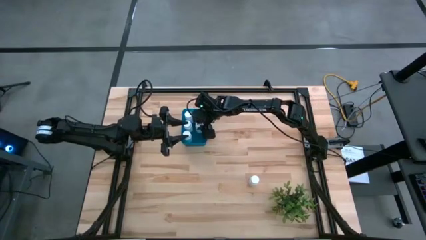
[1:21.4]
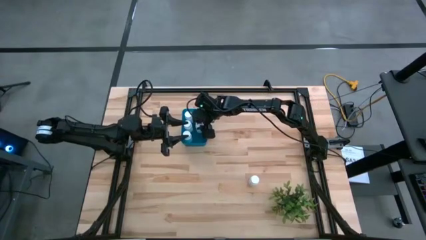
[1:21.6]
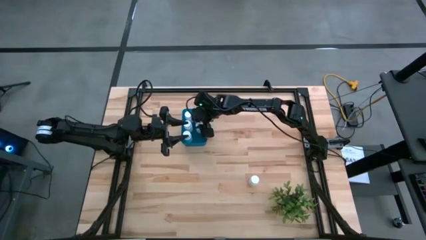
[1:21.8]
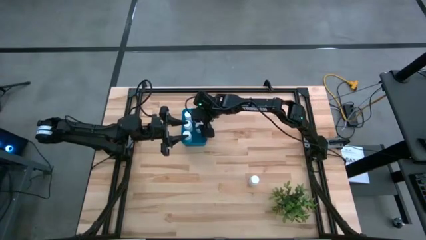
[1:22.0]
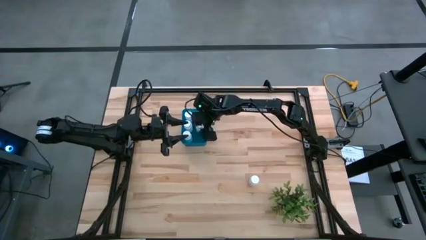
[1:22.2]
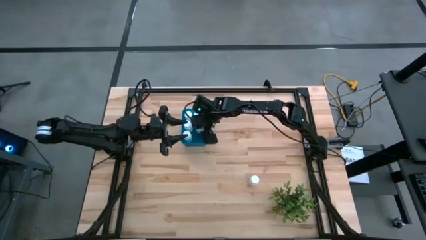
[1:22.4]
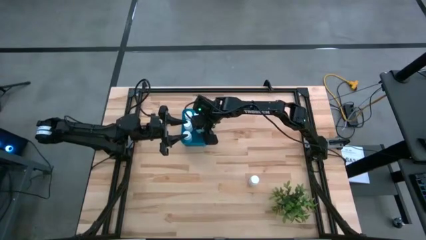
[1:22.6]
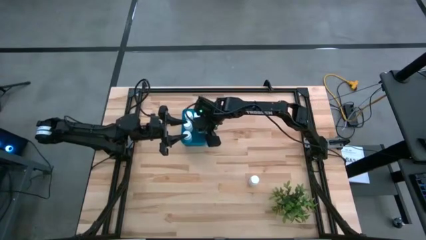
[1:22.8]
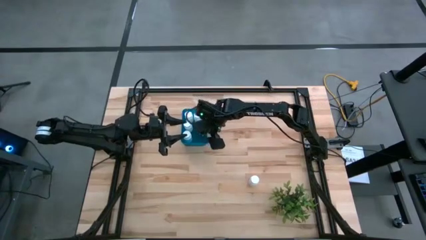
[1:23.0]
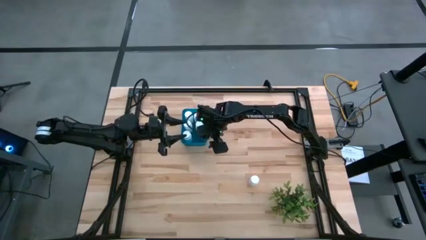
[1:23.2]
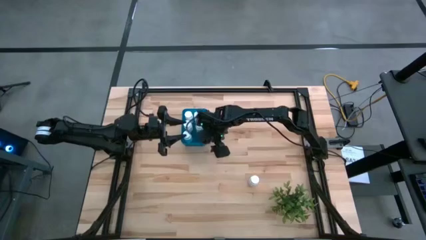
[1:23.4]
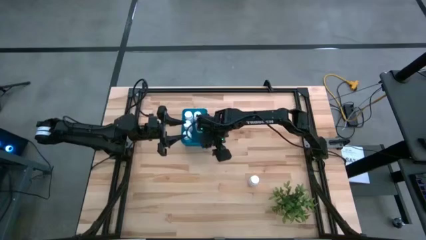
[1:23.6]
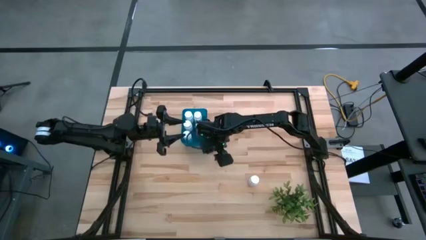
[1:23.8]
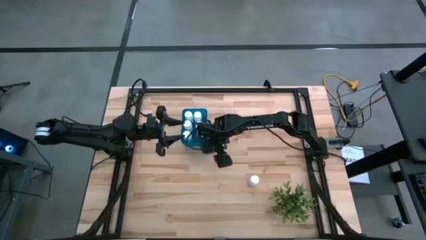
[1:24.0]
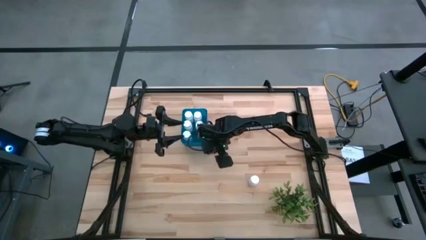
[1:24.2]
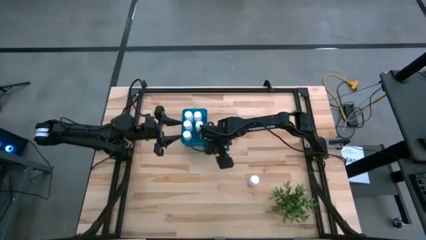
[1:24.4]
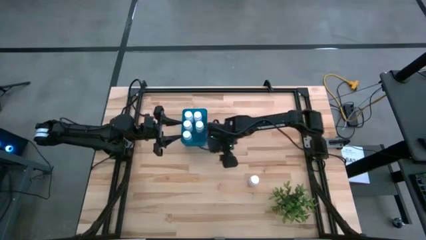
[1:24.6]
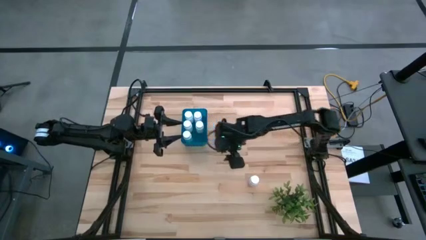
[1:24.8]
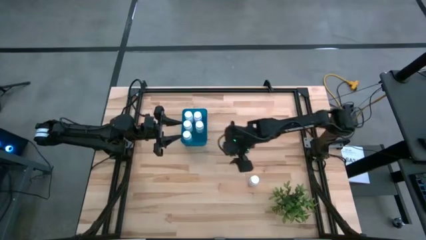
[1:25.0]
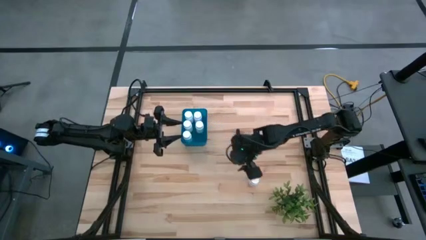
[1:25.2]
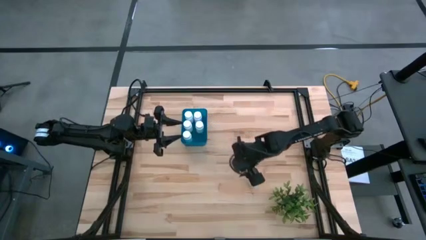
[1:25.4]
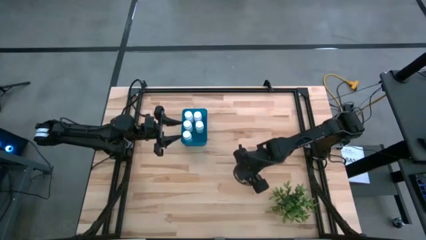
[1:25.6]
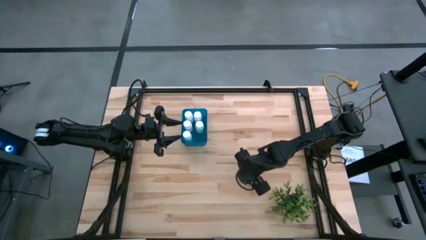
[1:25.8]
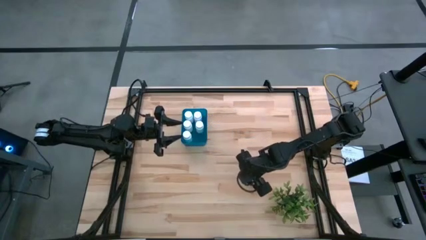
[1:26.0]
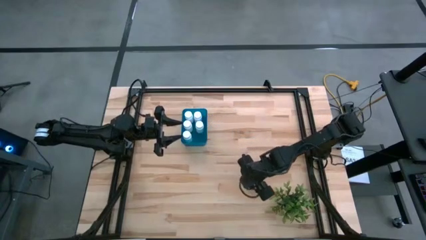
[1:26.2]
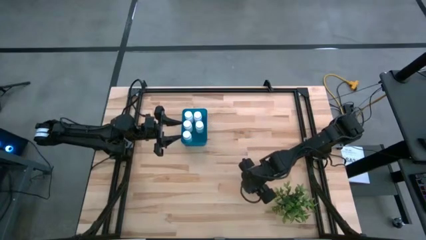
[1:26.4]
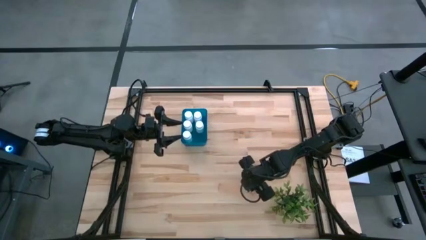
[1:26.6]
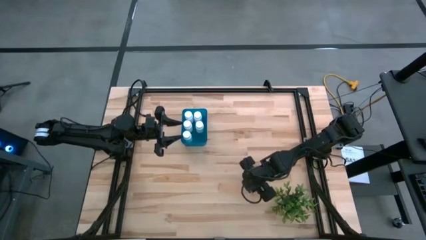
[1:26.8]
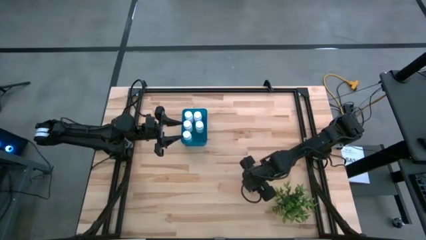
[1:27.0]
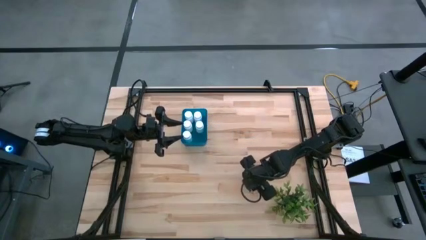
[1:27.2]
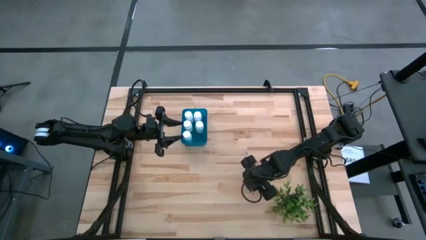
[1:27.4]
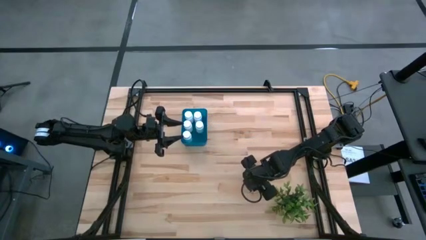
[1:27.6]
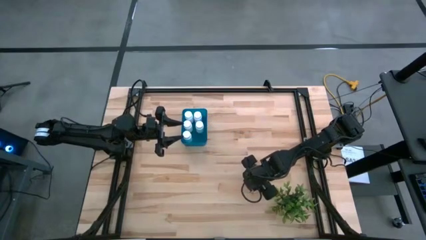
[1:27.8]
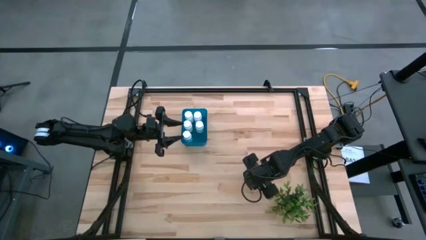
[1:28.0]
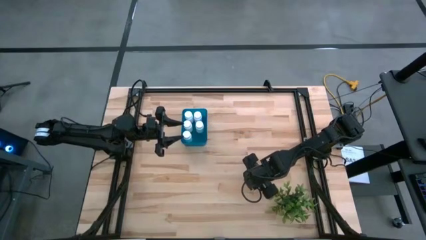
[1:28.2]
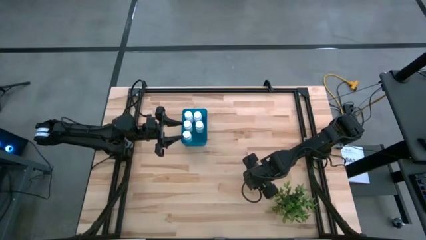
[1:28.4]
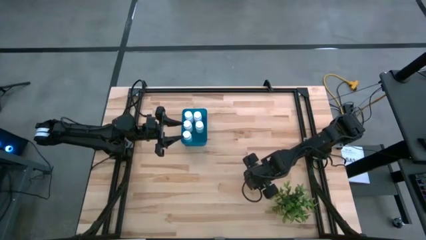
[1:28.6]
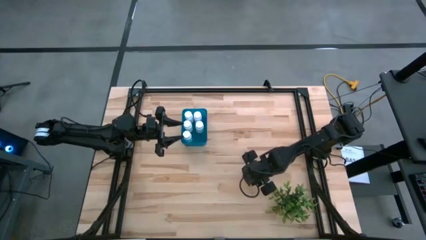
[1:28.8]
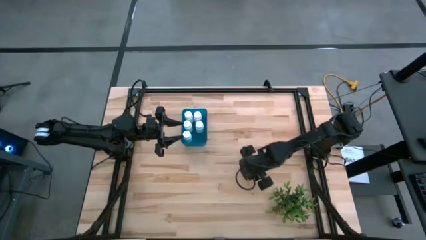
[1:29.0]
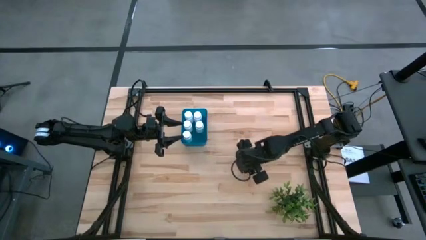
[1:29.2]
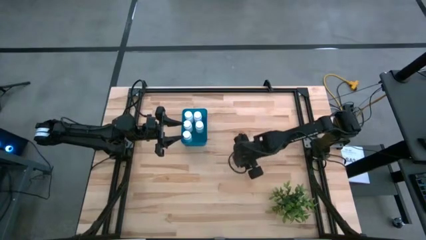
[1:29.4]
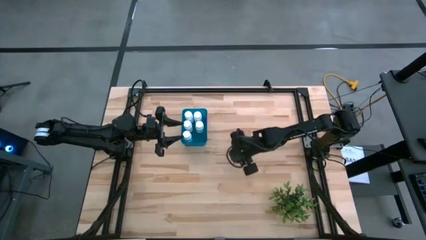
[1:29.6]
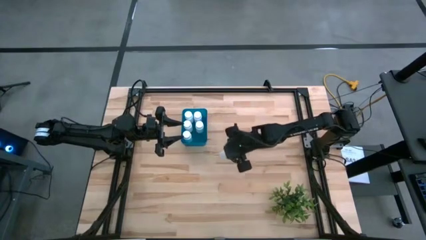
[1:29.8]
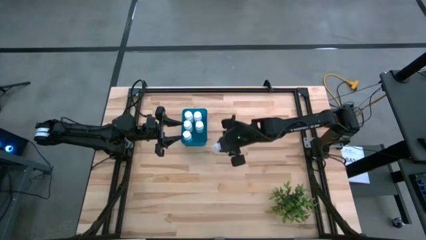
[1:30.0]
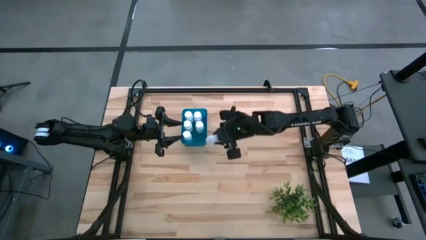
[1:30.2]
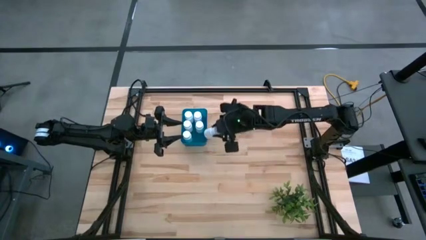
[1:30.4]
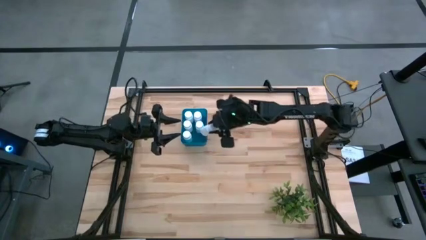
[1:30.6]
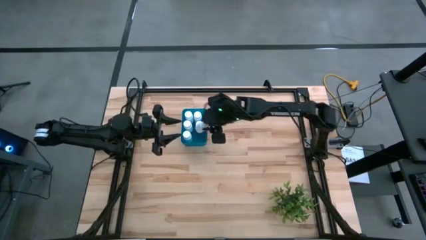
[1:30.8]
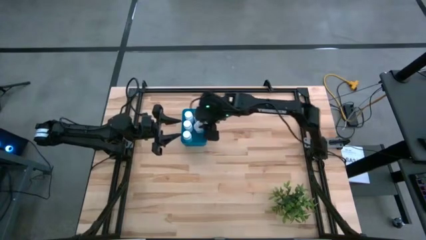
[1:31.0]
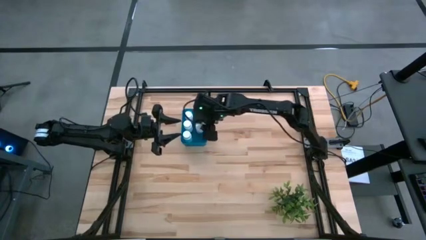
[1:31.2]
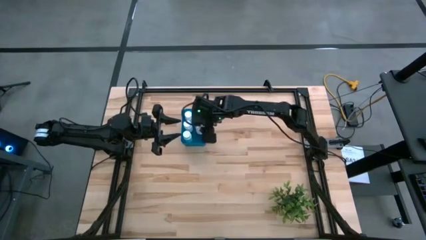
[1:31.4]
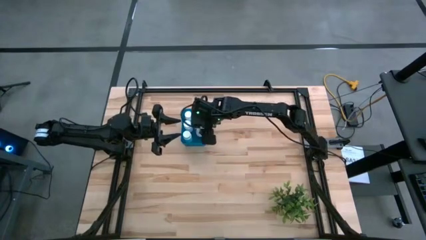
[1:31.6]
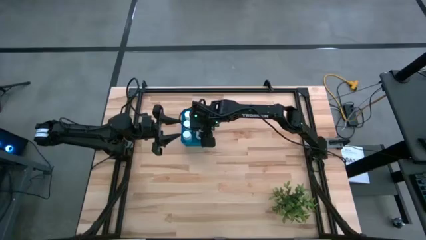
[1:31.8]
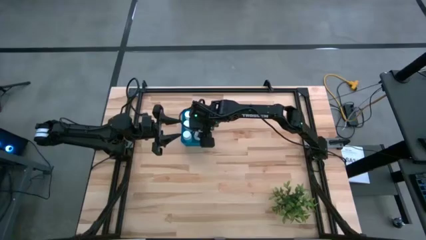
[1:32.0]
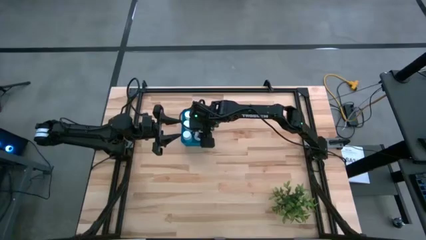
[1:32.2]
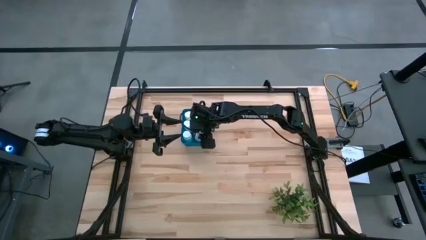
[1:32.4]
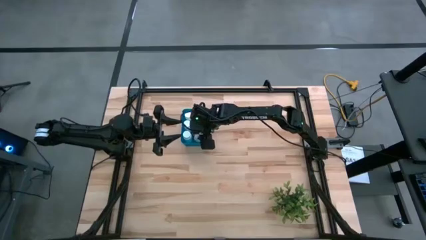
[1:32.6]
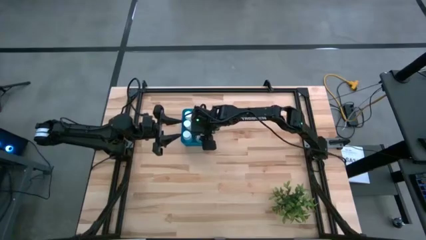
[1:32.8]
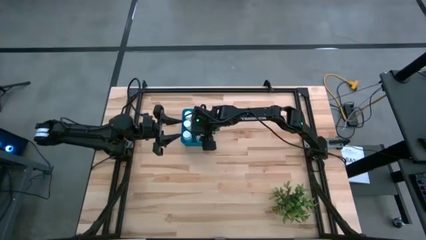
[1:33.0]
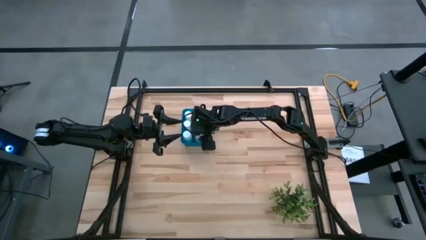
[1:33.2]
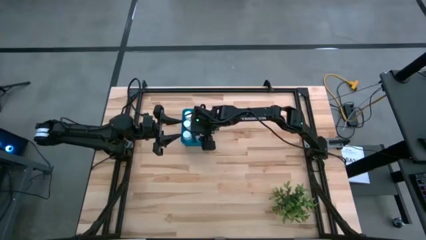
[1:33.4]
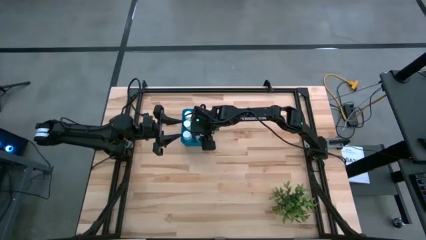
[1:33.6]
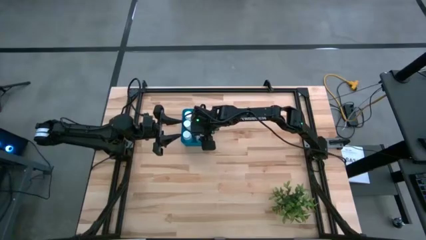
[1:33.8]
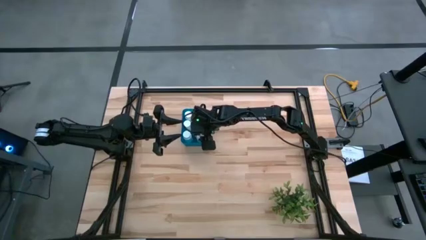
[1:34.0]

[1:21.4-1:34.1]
Task: Pick and place pill bottles into a basket
Put the white medicine bottle into the blue bin

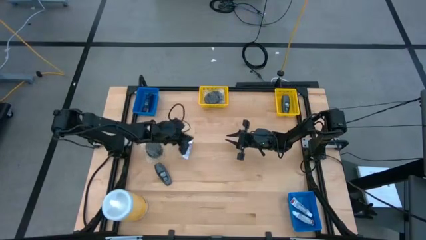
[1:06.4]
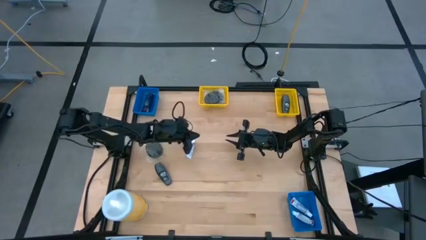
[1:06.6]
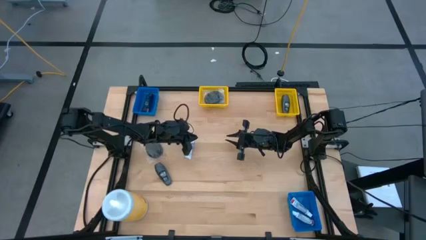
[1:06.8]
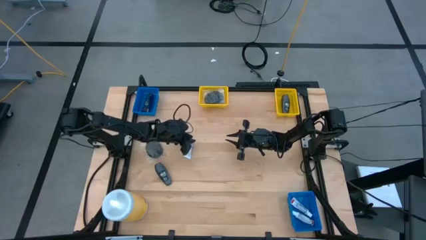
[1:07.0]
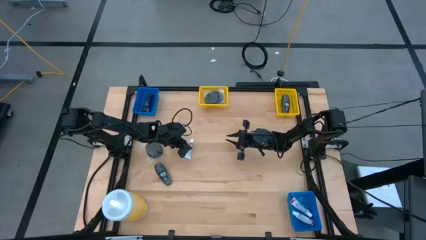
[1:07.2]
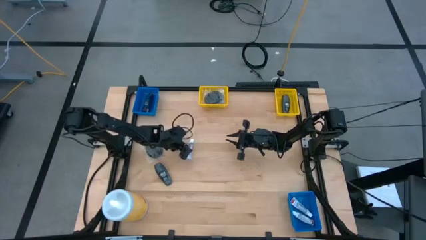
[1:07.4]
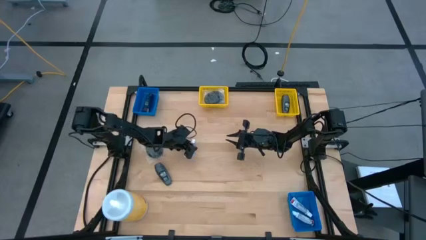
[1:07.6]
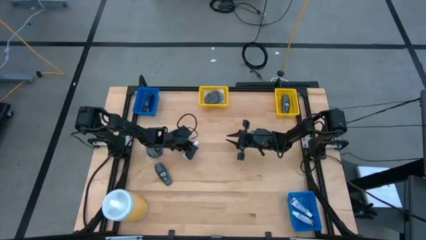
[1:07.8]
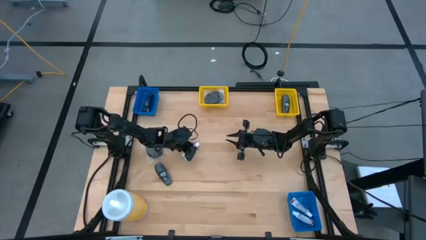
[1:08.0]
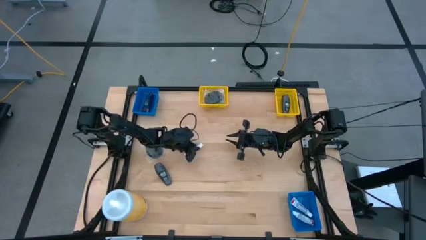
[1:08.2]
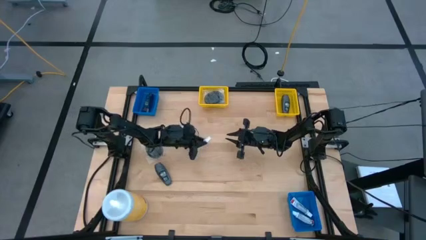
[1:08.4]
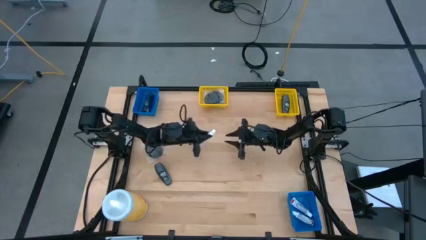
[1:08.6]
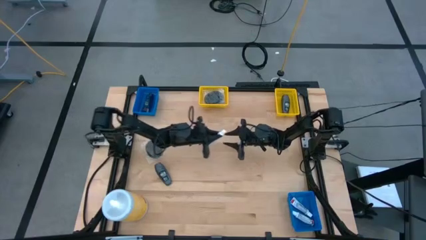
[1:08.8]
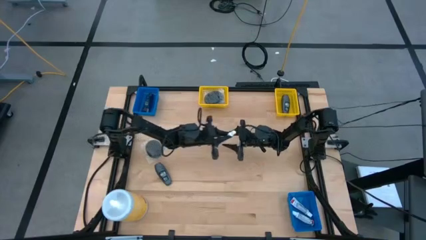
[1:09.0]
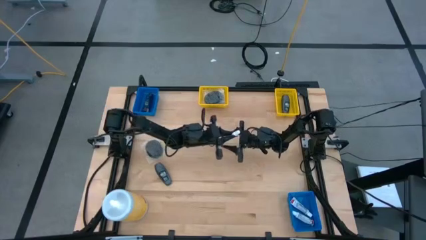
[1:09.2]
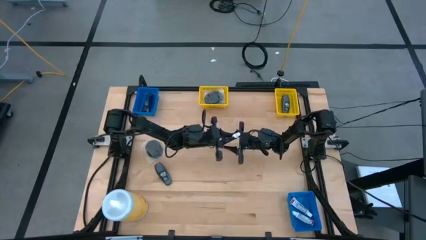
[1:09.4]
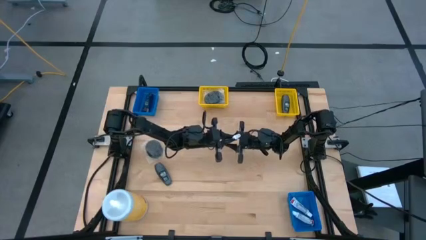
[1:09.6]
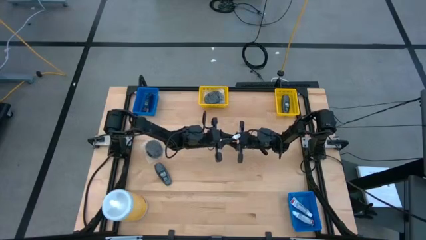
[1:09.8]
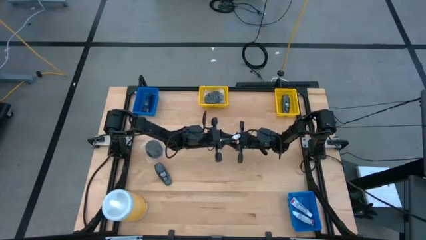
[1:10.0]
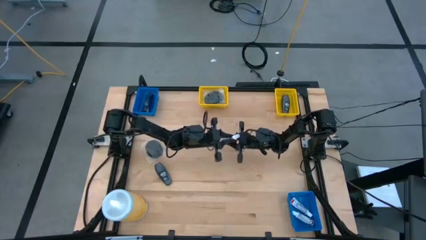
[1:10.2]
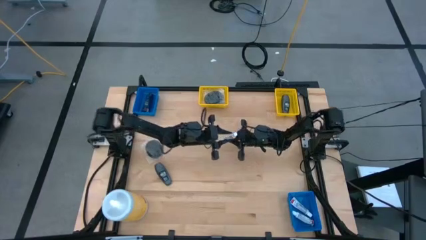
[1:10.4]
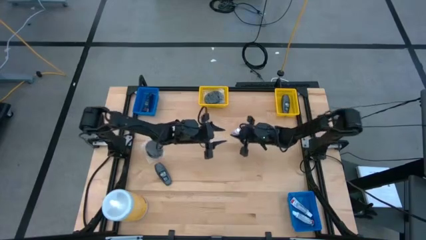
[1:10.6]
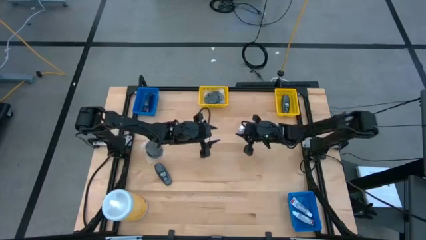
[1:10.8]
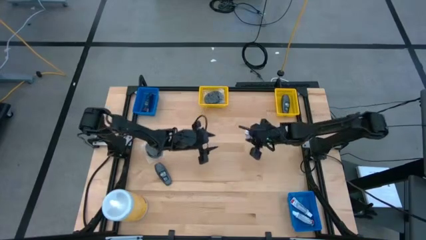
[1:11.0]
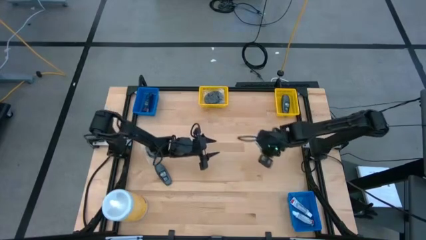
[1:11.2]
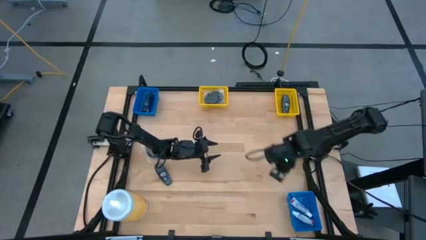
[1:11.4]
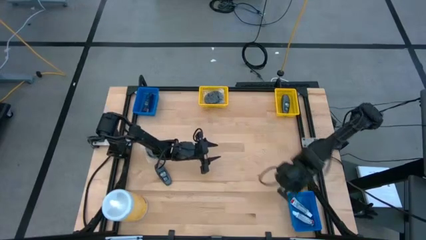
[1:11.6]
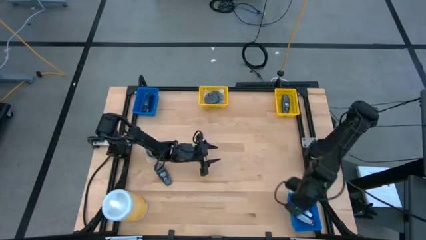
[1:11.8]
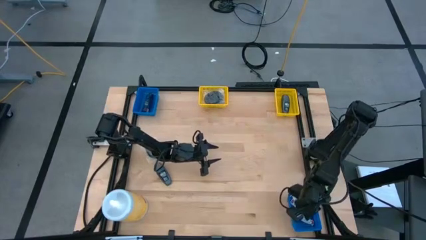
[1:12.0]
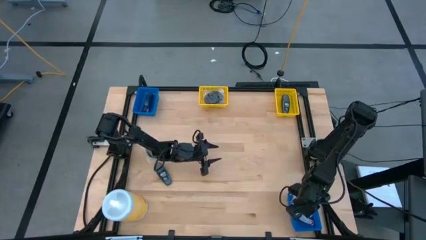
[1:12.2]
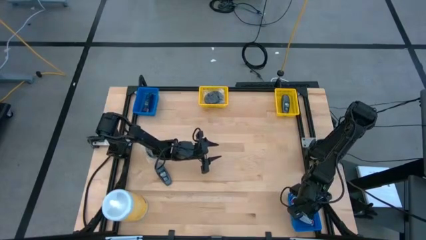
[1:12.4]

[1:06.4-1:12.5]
Task: Pick & Place Travel size toiletries
Put the toothpaste into the bottom blue bin
